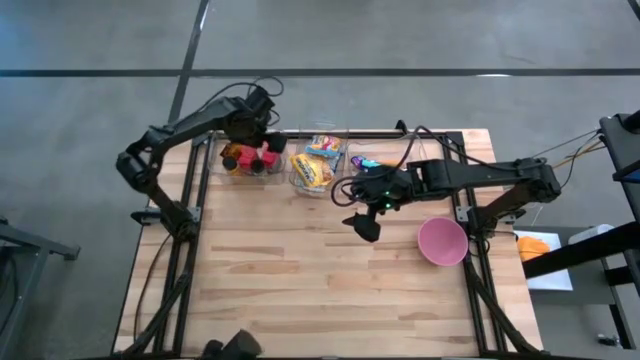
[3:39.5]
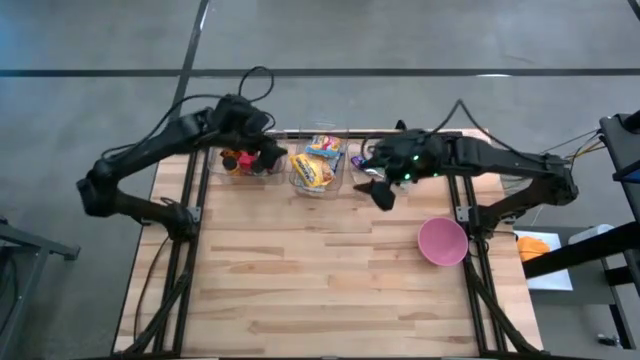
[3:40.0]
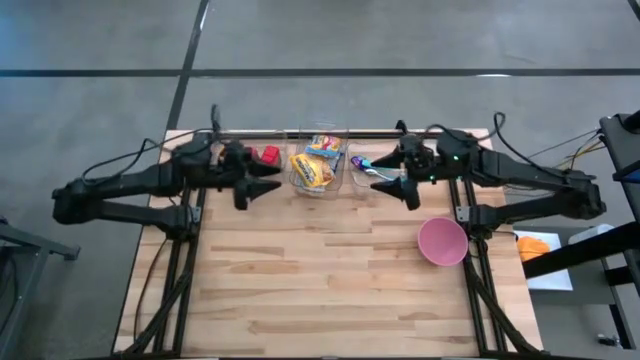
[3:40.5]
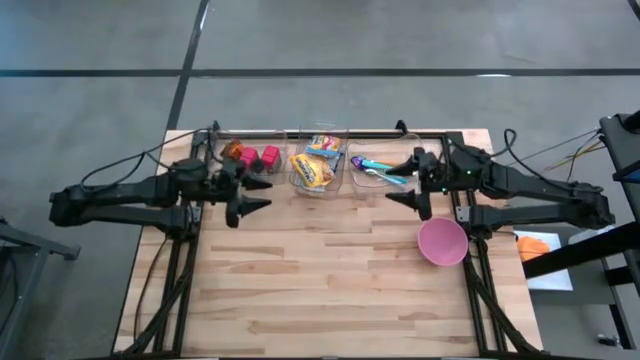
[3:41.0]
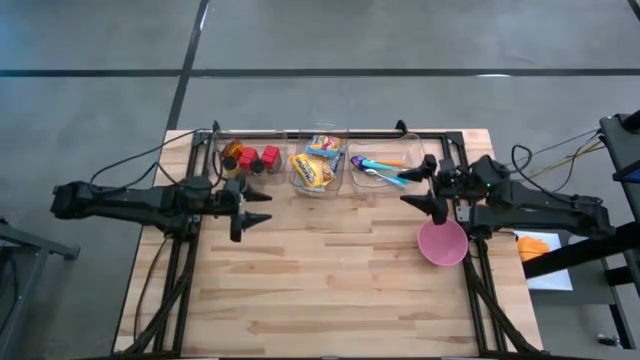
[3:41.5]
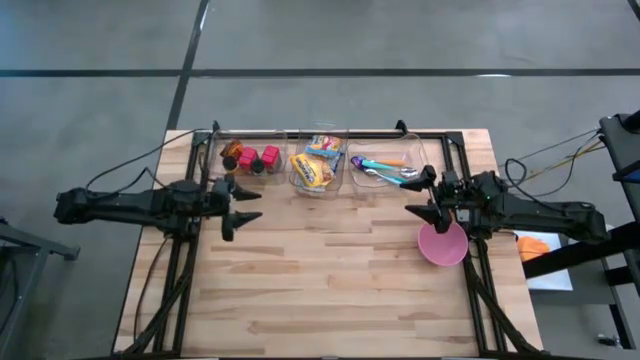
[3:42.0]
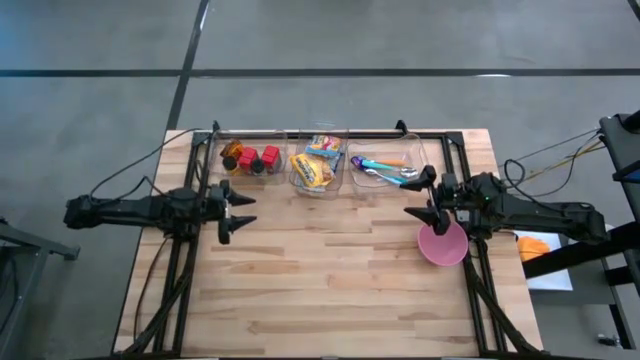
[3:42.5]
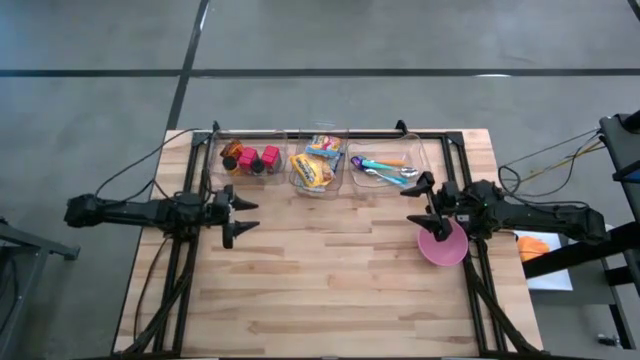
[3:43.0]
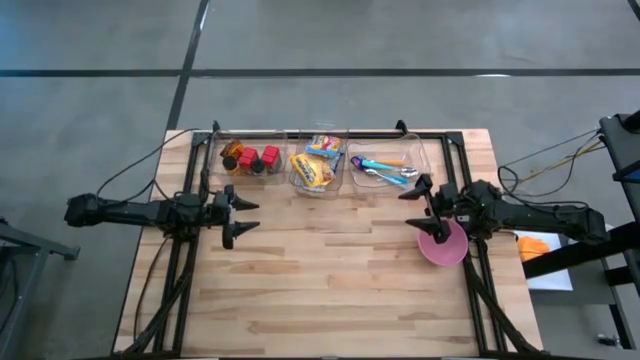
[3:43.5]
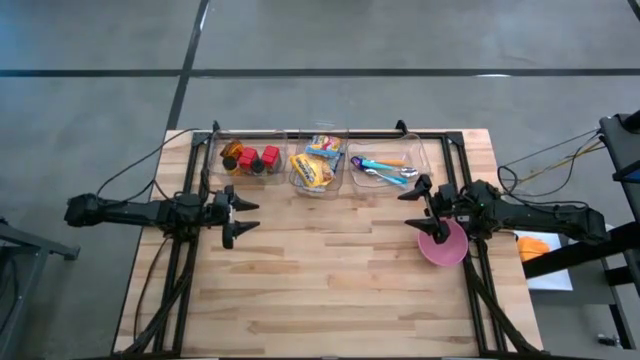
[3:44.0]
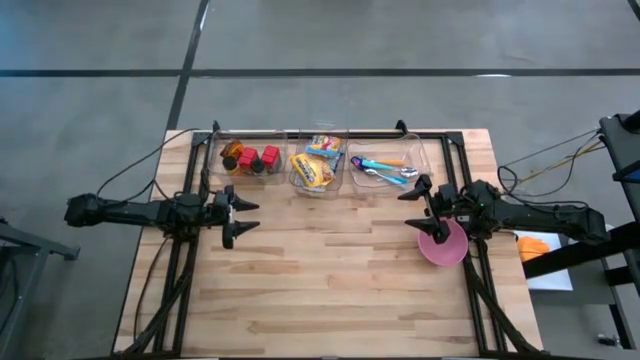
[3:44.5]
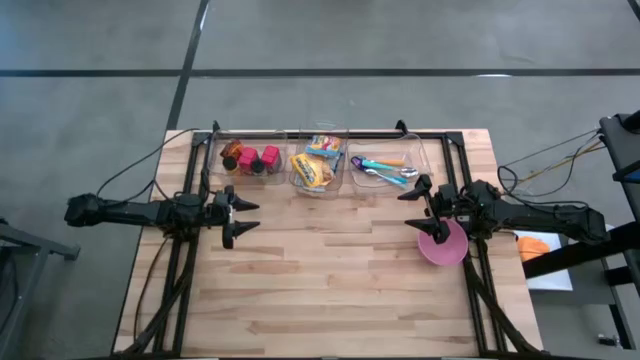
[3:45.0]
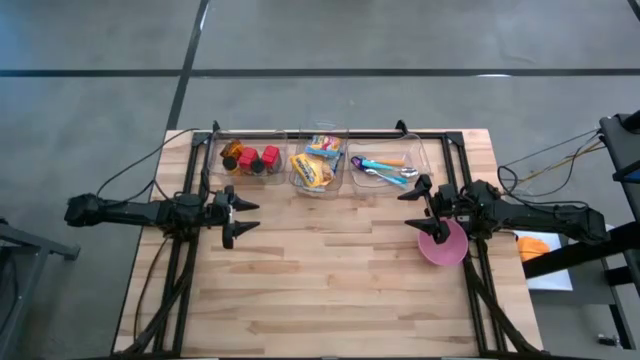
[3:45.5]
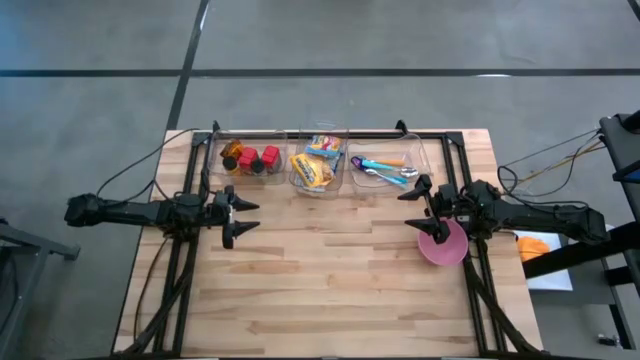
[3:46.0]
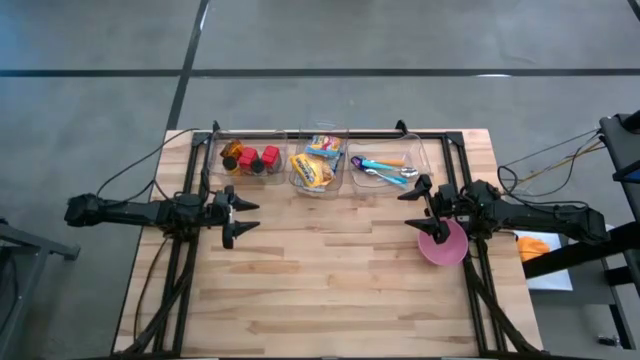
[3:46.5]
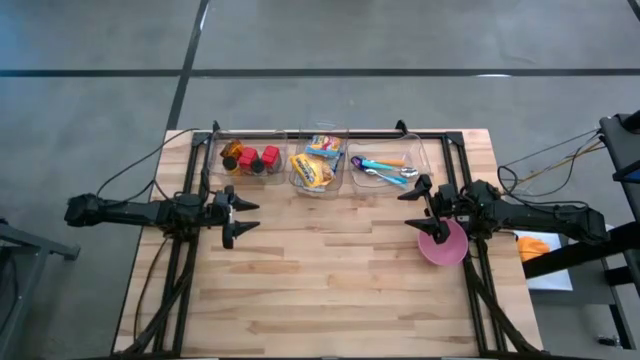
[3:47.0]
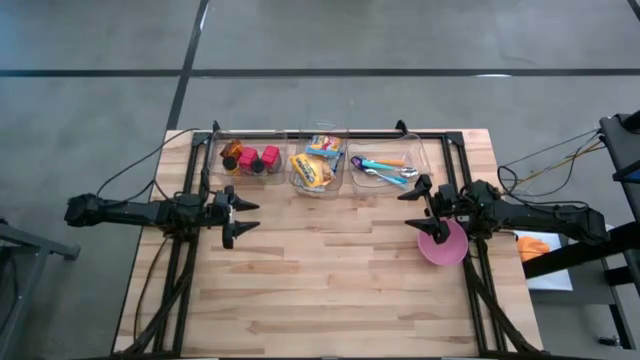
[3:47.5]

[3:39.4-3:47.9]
Return to Home Position

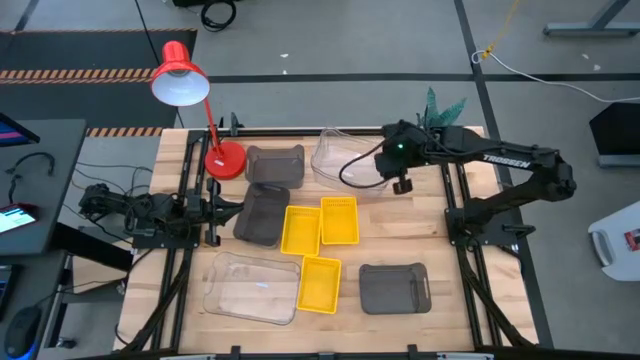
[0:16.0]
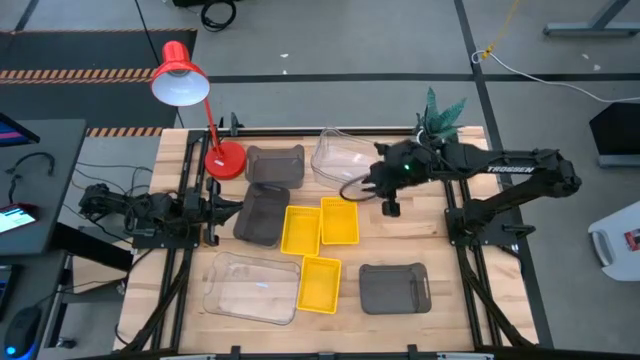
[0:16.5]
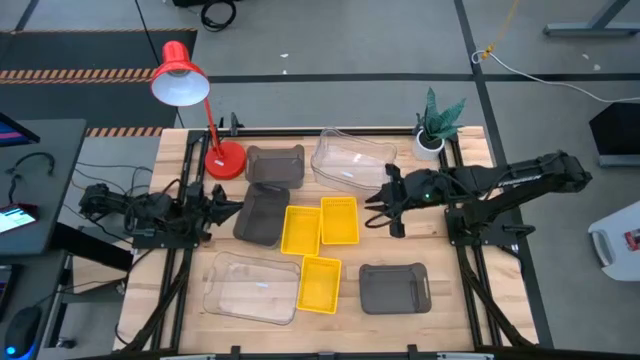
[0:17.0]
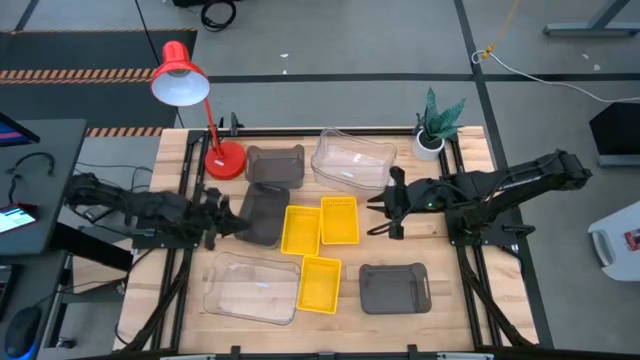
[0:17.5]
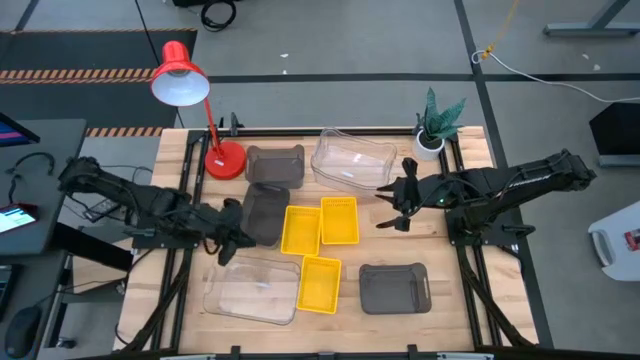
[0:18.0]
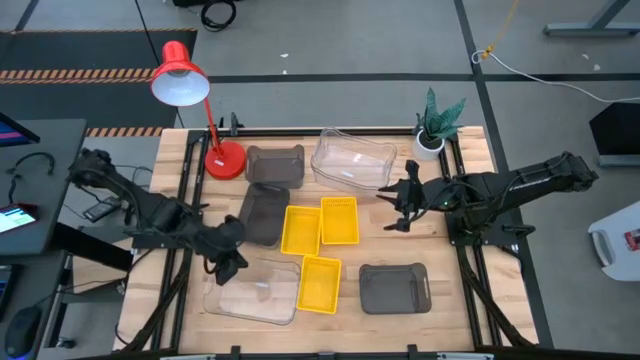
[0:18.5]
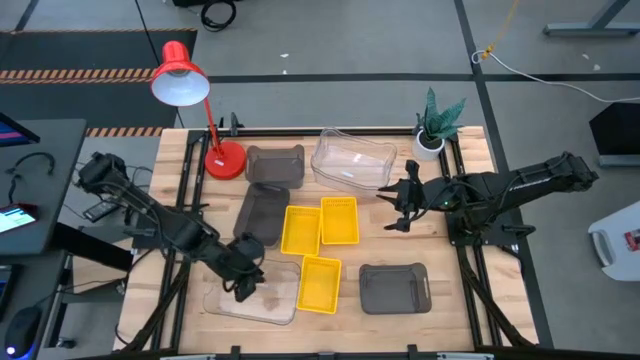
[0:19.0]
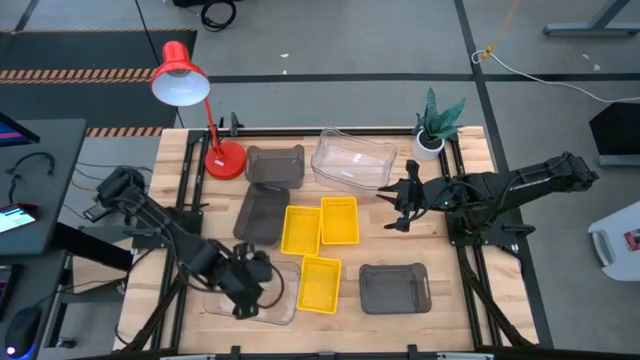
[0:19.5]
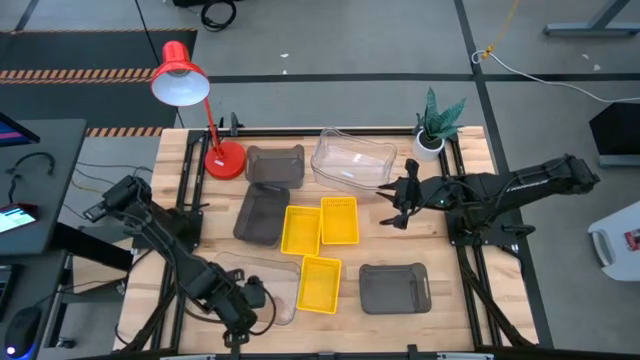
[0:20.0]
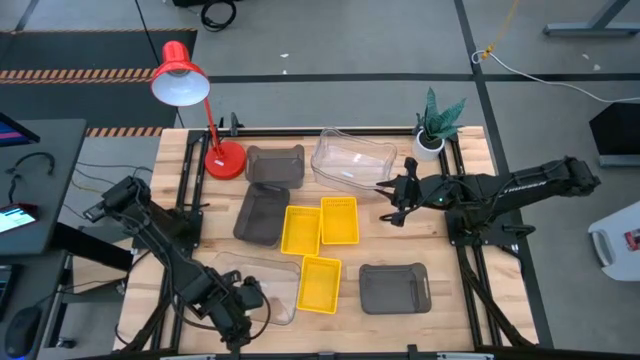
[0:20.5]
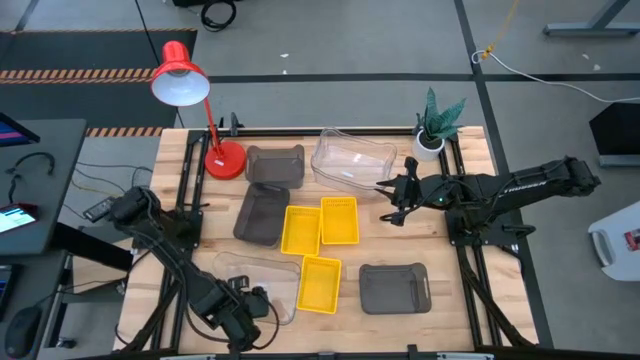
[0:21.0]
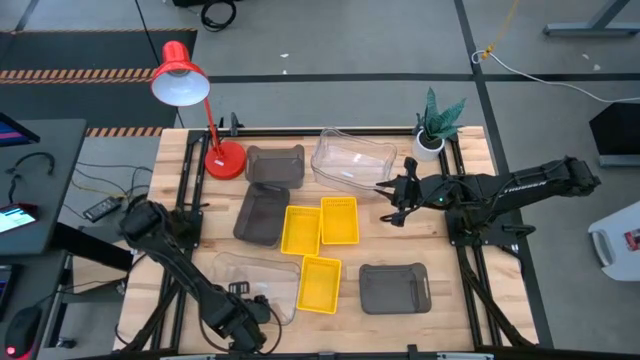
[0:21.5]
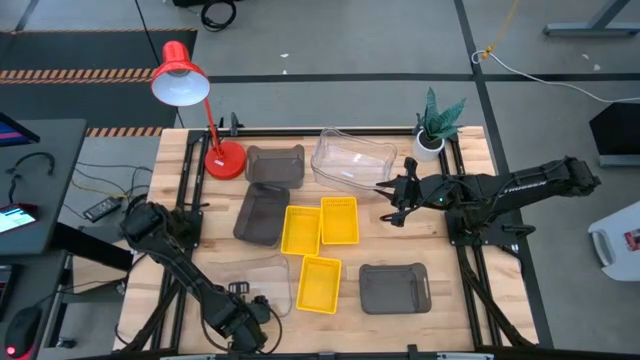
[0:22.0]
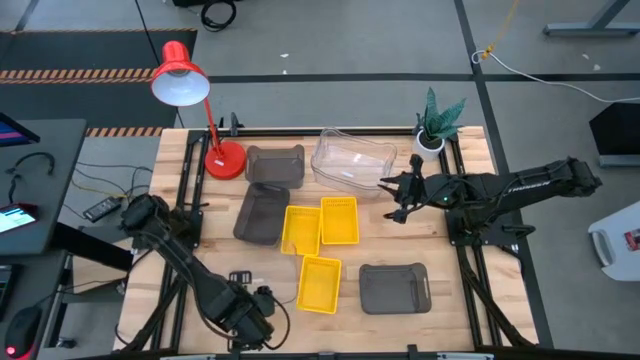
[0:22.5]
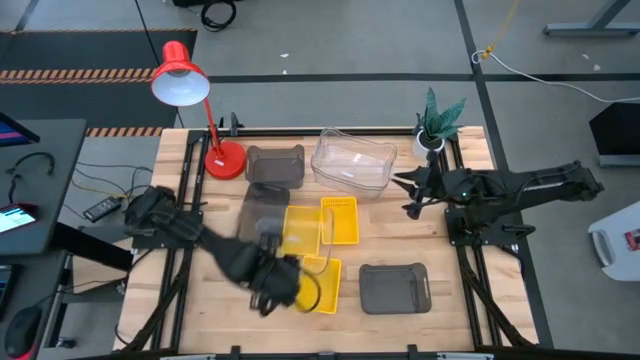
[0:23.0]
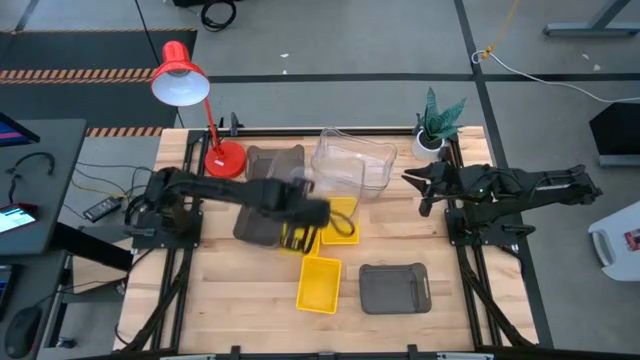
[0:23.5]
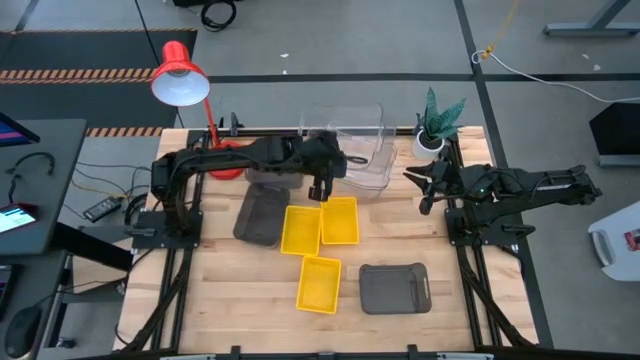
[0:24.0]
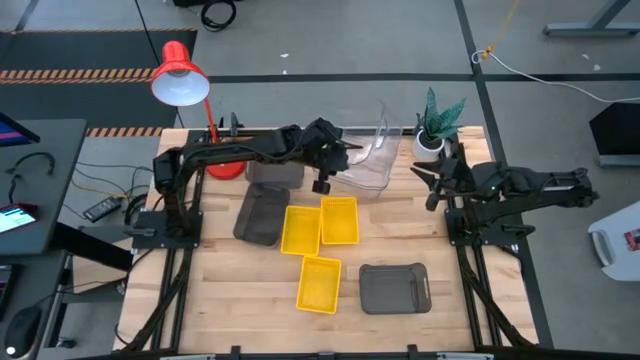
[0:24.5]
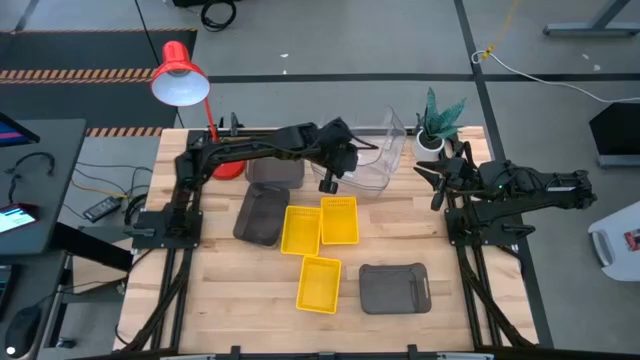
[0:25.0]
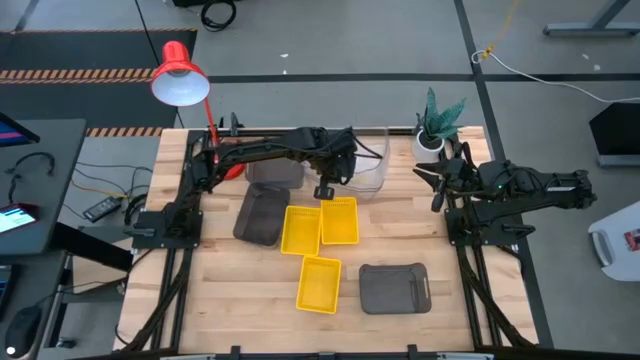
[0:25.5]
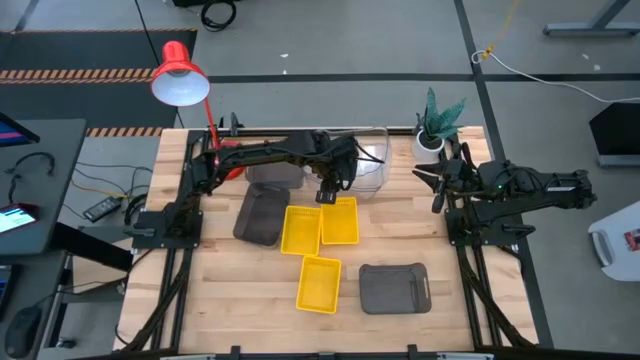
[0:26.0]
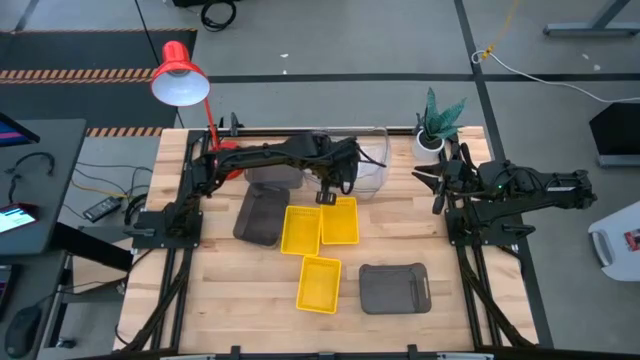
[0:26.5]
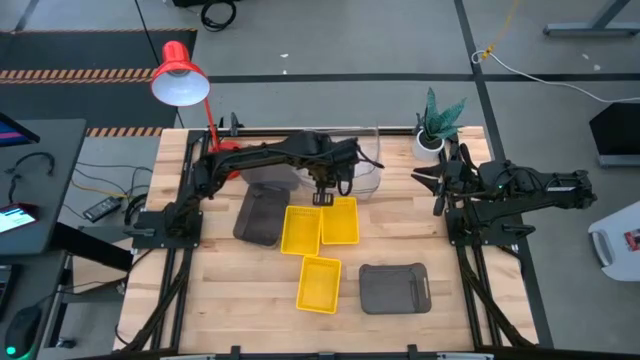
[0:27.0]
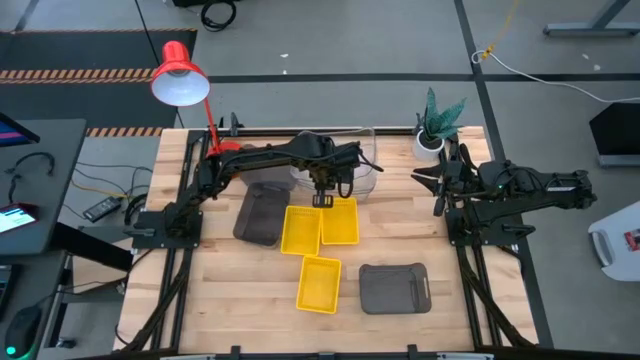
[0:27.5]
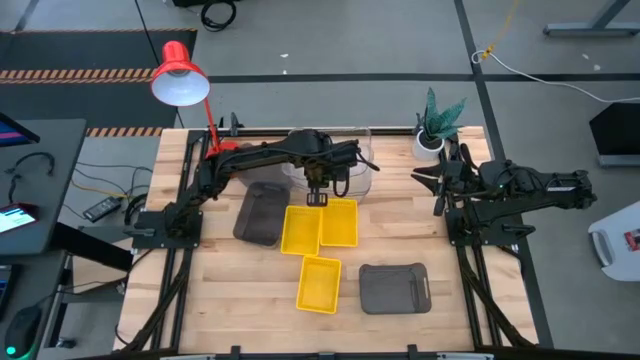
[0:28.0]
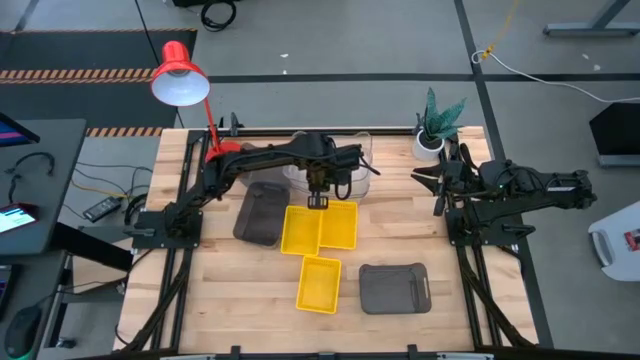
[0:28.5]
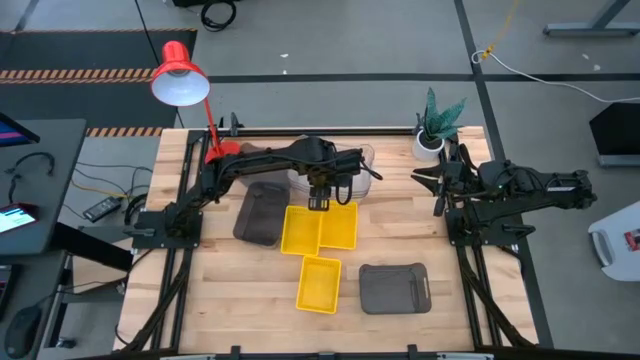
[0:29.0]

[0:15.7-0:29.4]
Stack the bottom transparent bin on the top of the stacked transparent bins
